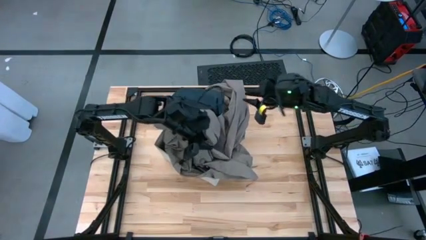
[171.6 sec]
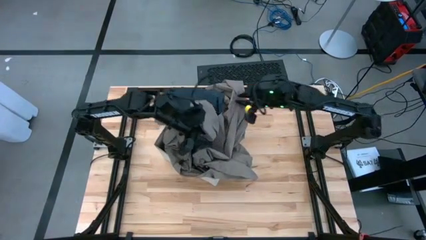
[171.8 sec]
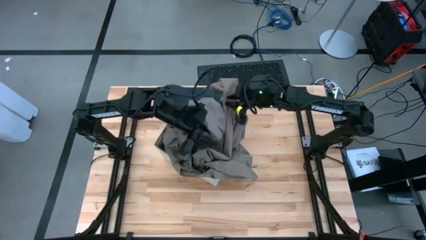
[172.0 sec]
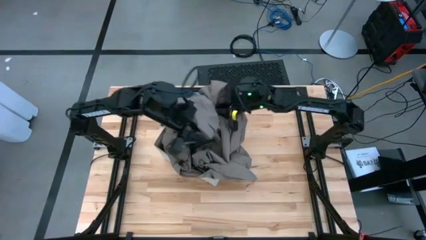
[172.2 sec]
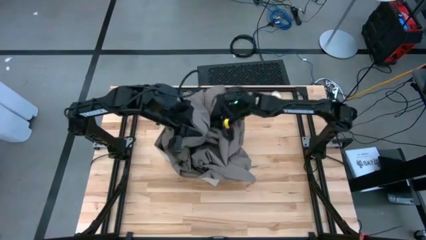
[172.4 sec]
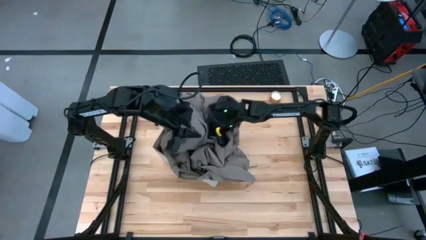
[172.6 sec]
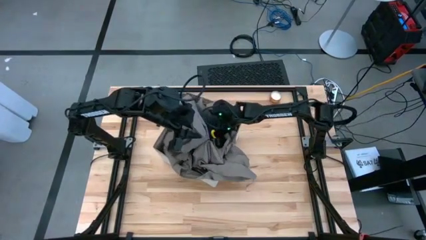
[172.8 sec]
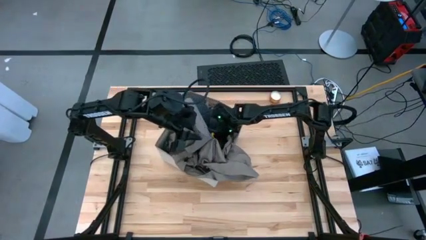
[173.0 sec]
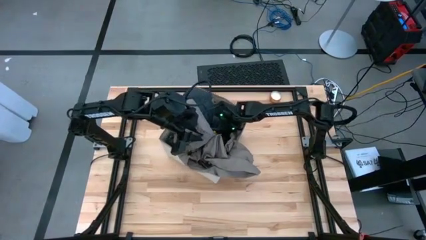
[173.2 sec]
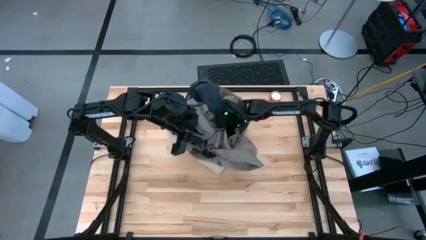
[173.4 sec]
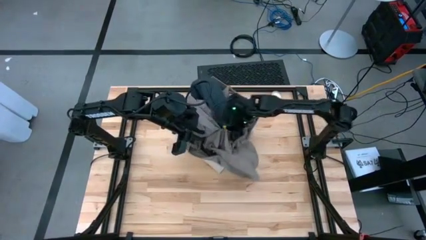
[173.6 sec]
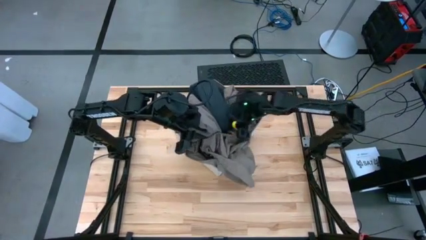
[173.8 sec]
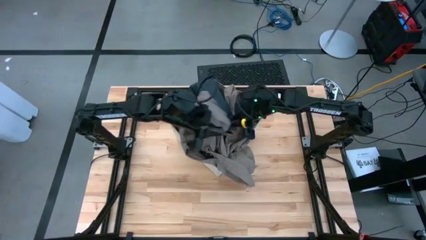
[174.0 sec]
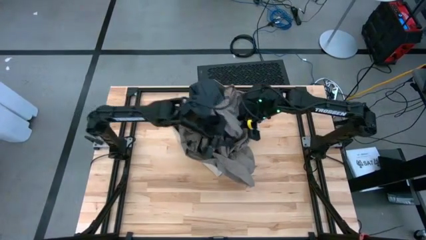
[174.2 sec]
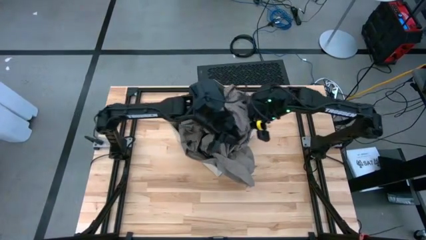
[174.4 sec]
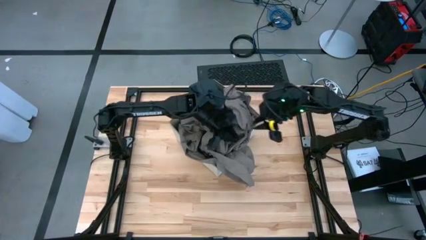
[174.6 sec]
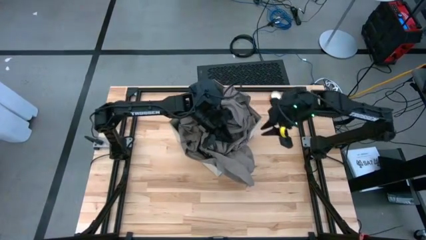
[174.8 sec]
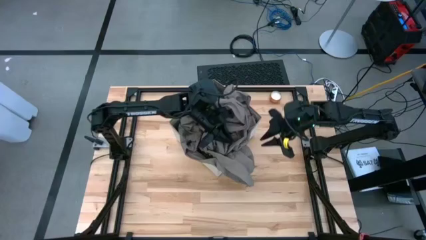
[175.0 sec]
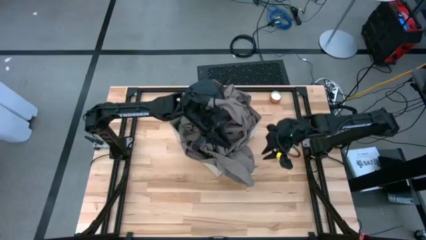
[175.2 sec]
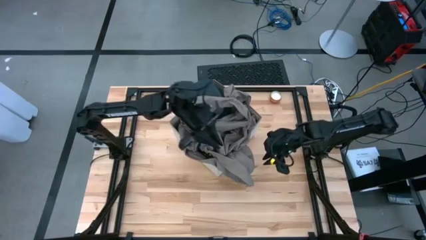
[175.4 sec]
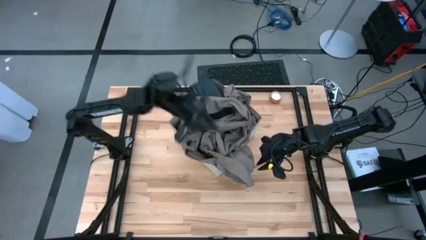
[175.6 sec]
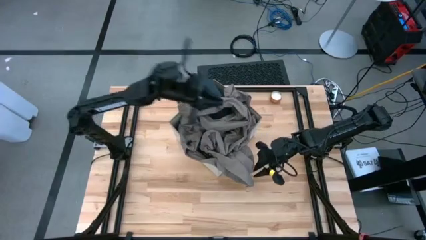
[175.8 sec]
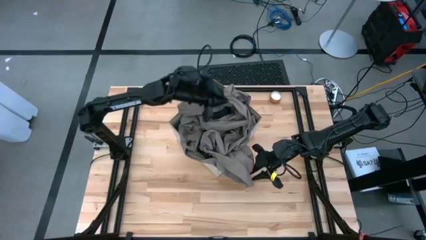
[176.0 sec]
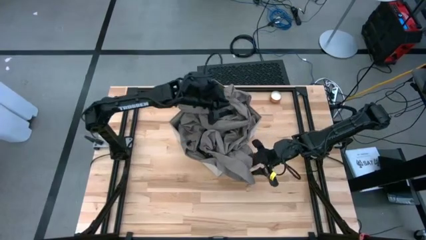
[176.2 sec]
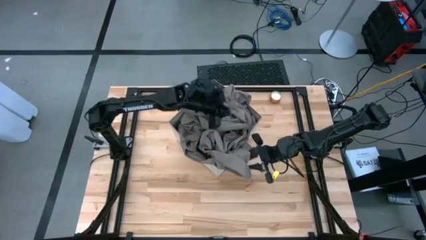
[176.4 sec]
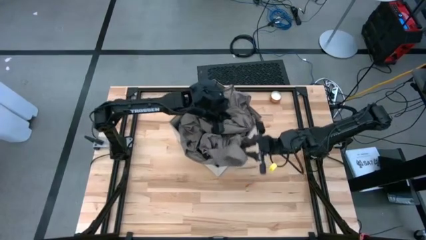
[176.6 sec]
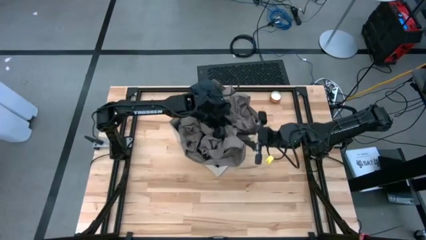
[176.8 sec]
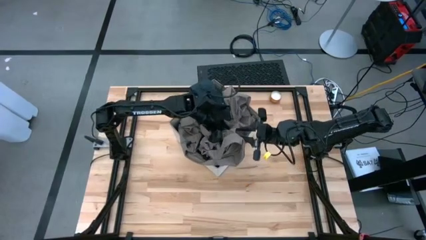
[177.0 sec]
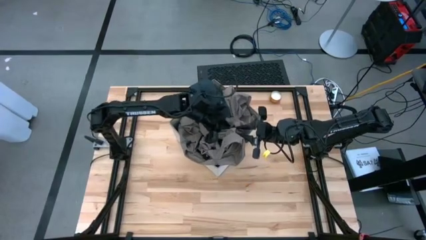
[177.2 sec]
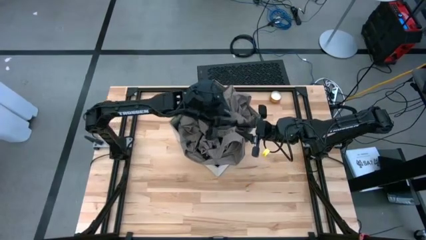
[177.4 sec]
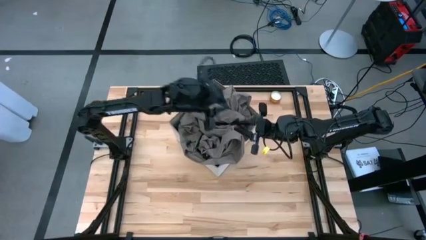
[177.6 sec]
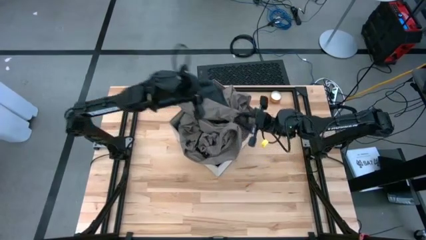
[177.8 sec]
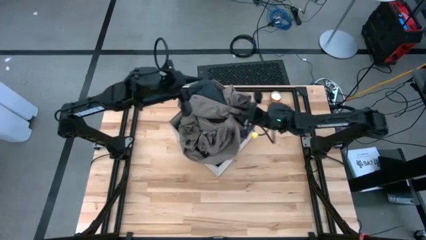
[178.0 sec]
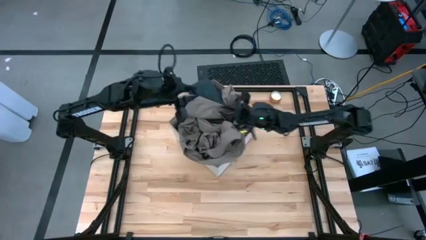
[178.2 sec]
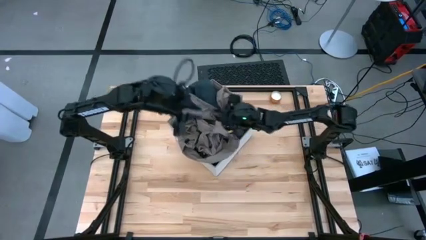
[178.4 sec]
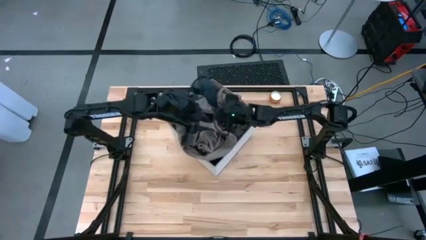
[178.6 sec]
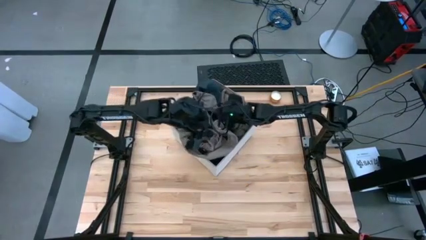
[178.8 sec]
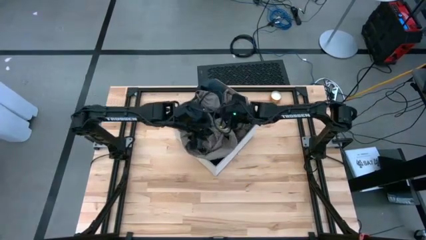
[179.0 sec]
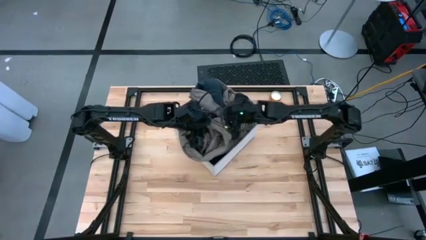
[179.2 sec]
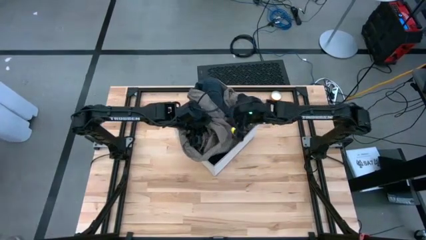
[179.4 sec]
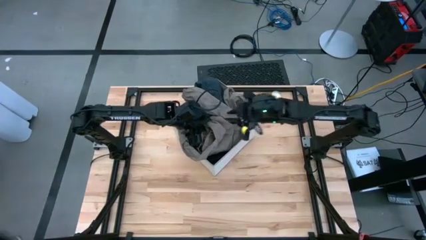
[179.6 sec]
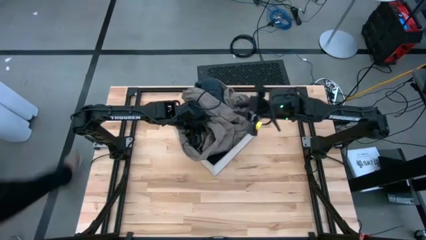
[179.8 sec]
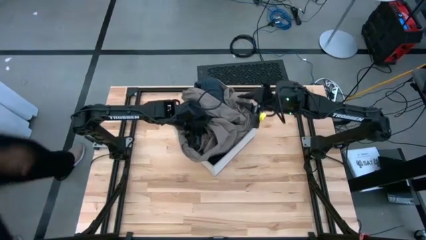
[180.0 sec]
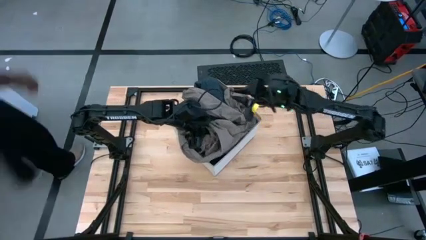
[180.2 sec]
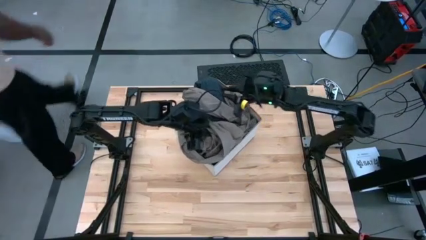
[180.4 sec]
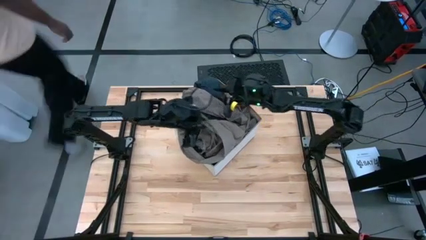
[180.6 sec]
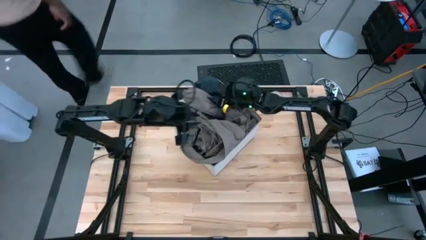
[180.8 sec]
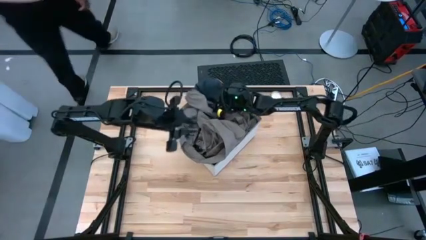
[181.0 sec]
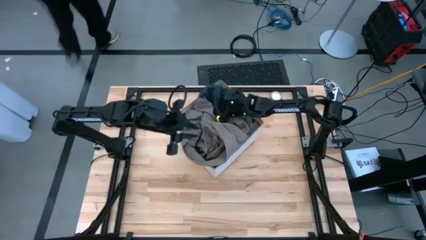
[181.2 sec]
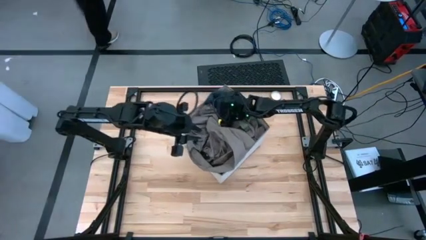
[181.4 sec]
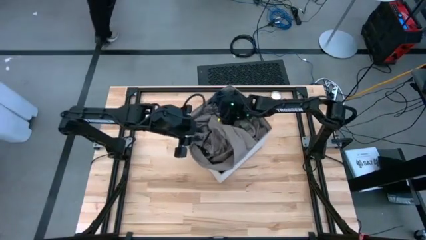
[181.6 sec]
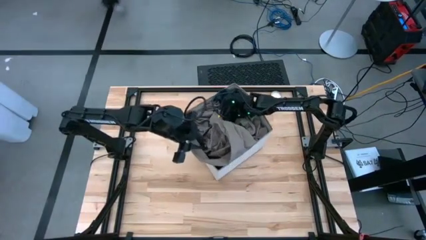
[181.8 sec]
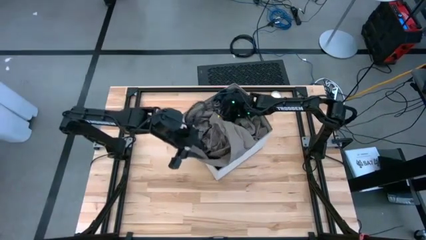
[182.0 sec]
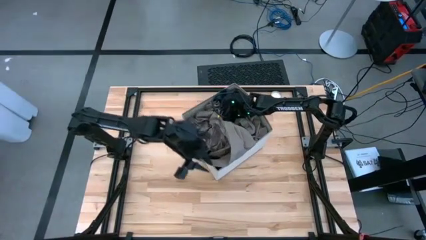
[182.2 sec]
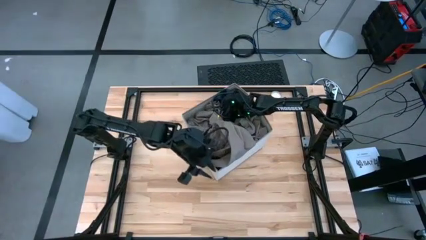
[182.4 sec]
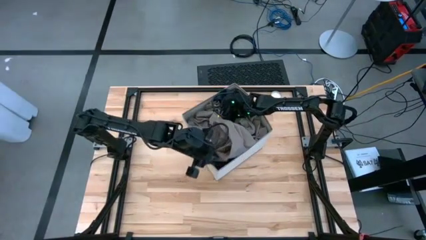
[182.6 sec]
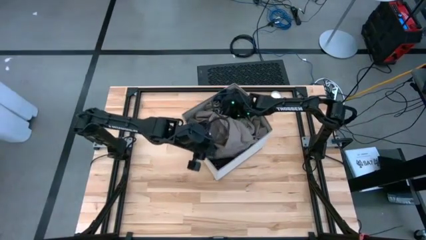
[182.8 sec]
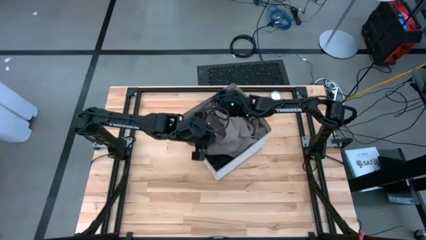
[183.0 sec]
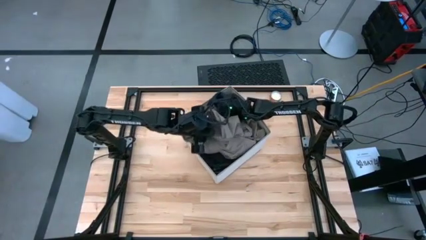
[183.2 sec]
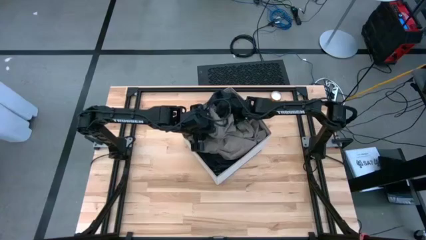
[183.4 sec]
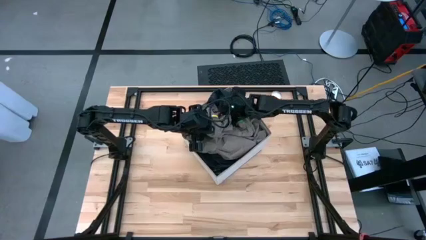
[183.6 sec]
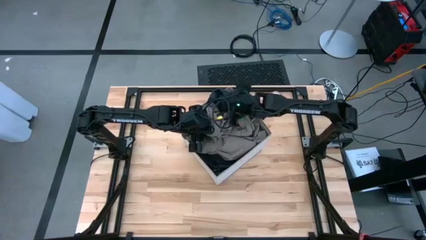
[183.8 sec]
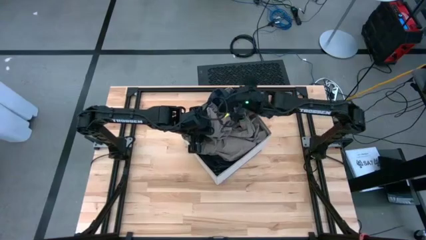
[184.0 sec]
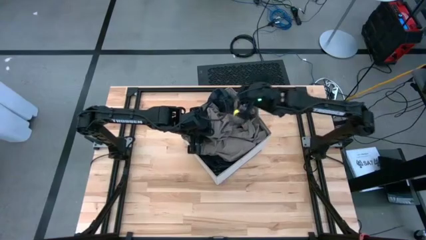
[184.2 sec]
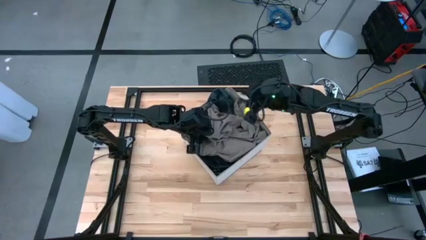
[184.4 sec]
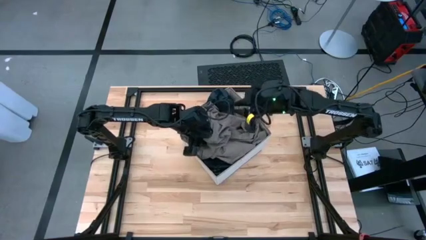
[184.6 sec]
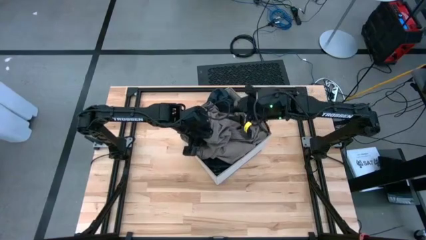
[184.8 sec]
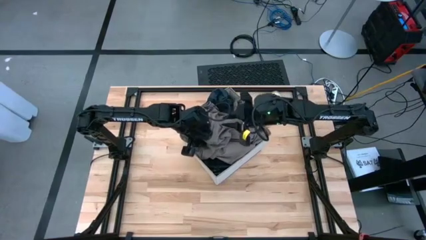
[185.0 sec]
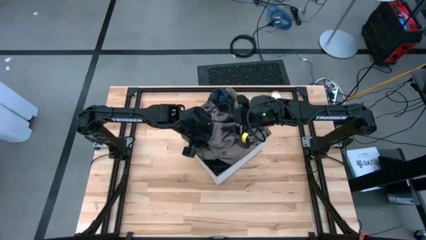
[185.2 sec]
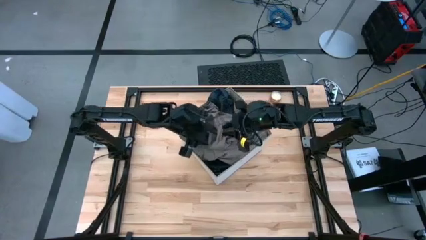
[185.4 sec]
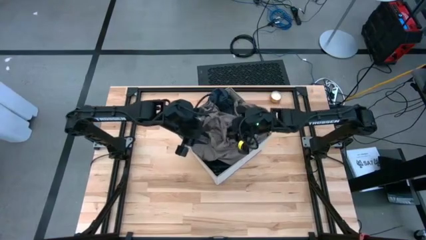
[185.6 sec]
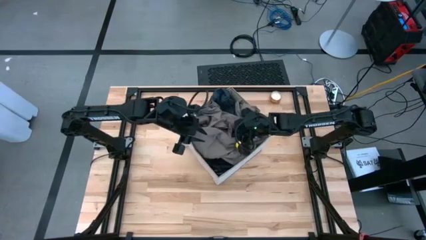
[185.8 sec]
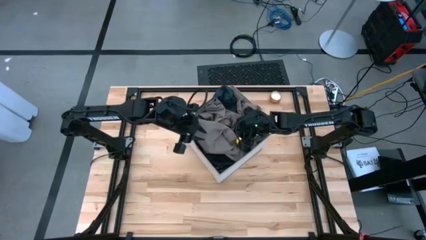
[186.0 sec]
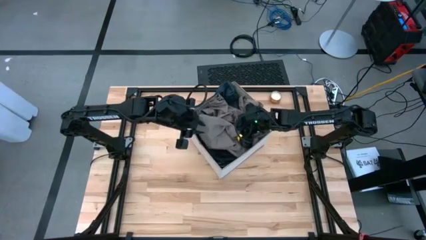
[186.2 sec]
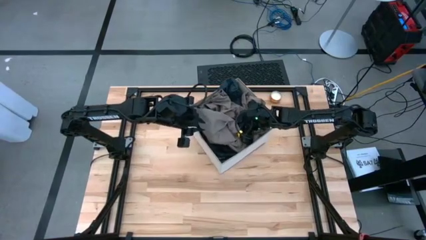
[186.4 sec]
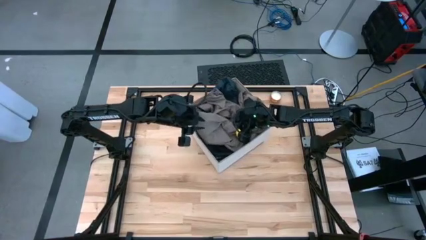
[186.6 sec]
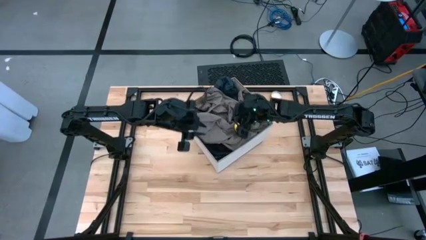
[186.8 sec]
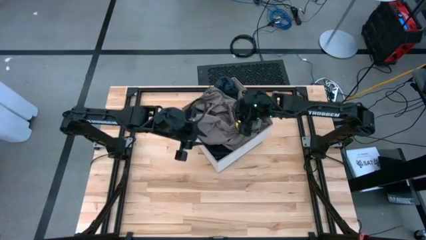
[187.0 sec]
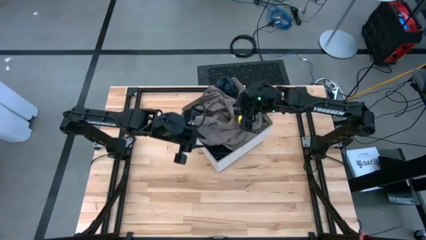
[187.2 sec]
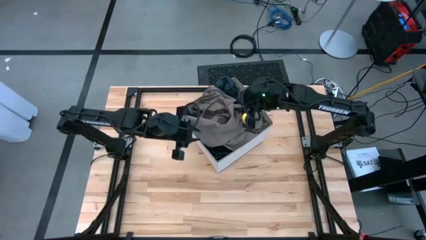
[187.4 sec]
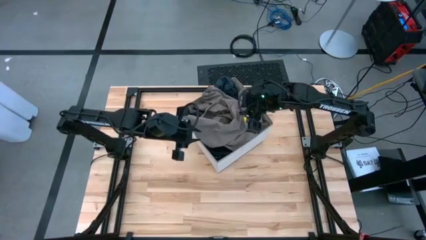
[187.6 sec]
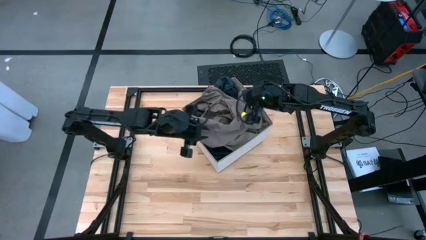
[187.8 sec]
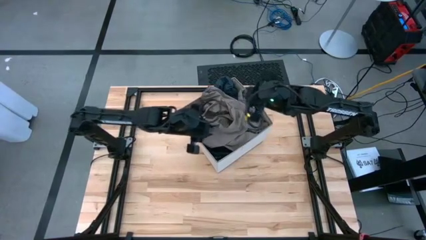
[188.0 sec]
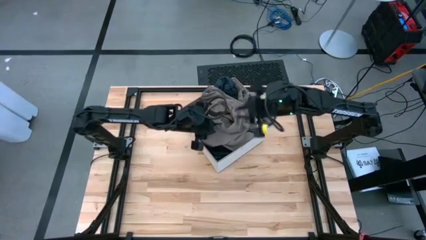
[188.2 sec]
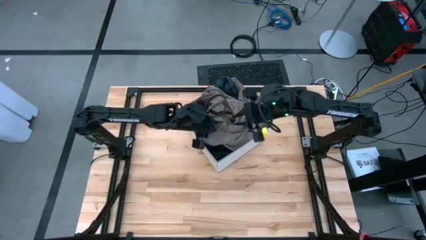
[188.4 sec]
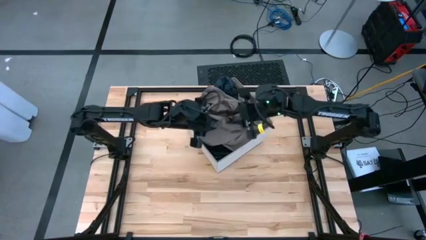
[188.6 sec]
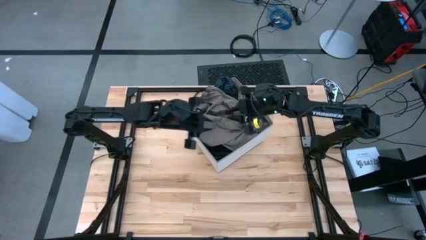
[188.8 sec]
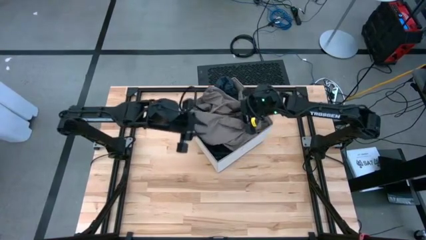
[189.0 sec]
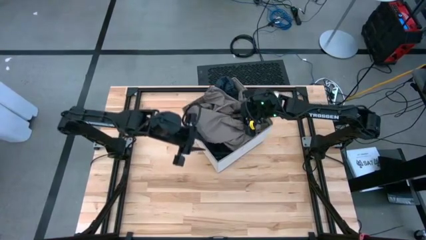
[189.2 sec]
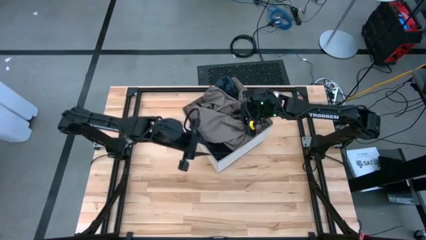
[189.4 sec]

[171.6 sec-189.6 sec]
Task: Sort clothes
Put the brown jacket into the laundry organizer
